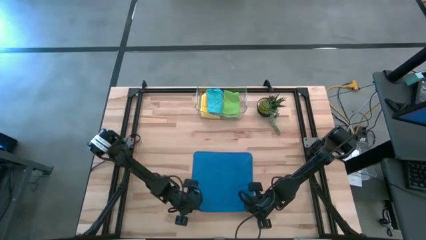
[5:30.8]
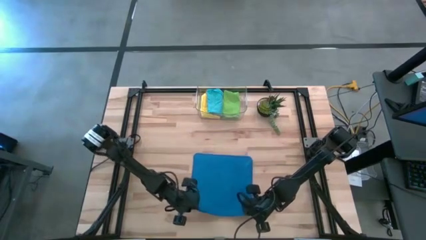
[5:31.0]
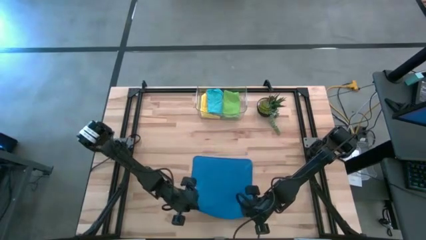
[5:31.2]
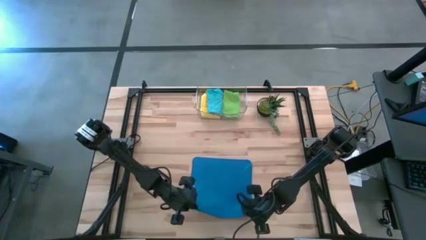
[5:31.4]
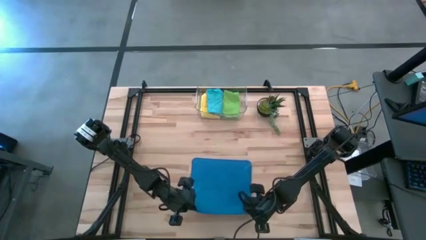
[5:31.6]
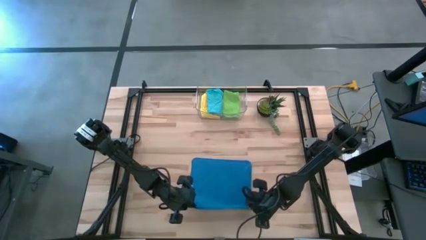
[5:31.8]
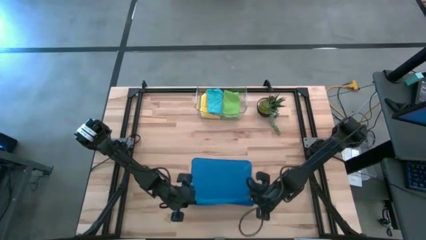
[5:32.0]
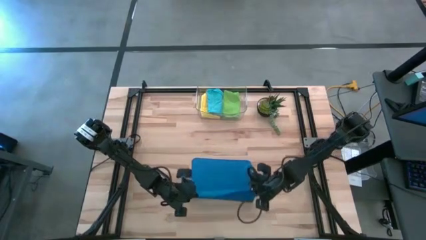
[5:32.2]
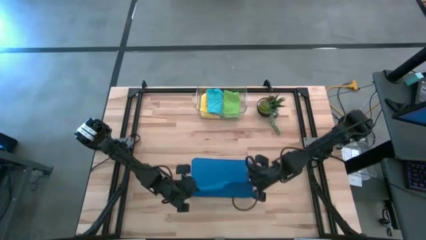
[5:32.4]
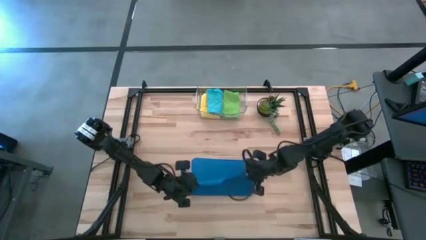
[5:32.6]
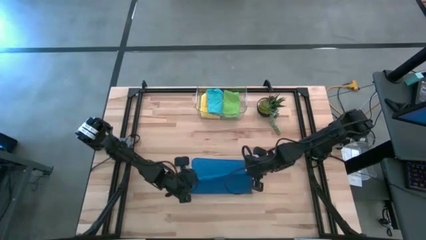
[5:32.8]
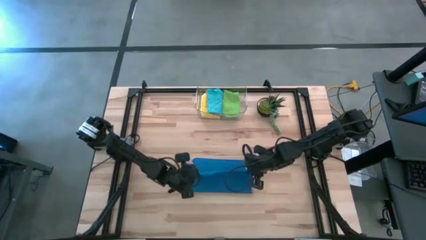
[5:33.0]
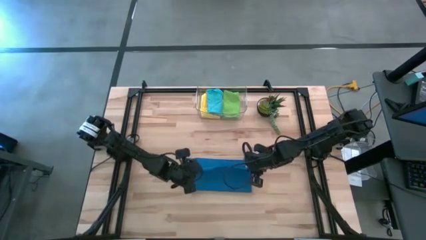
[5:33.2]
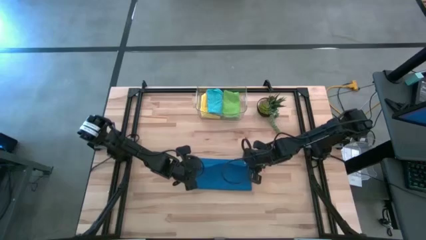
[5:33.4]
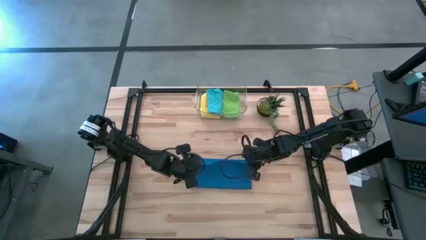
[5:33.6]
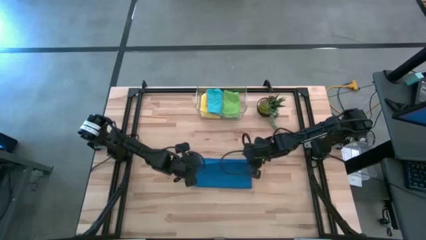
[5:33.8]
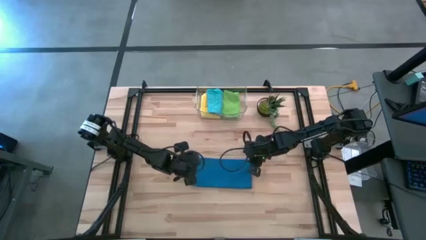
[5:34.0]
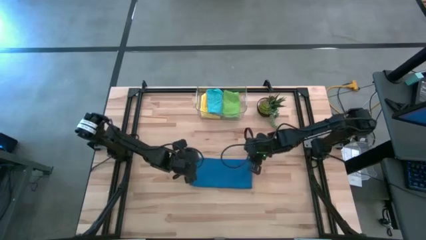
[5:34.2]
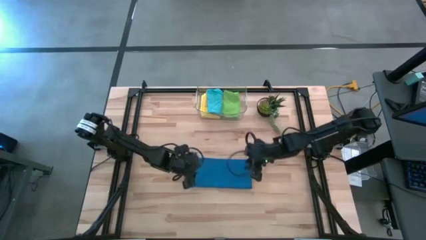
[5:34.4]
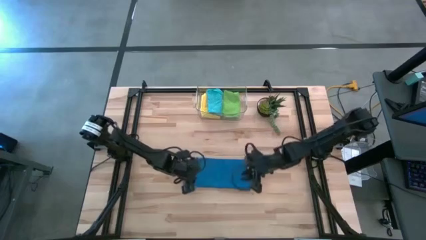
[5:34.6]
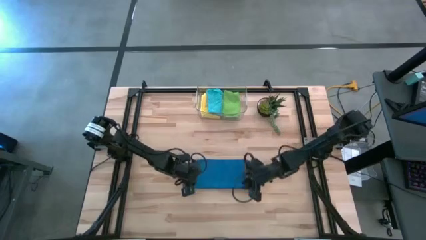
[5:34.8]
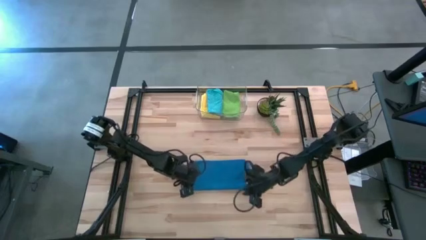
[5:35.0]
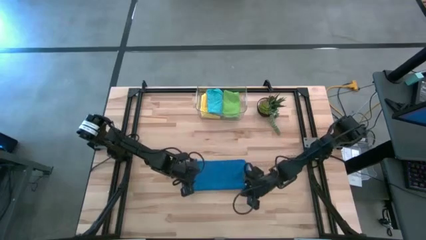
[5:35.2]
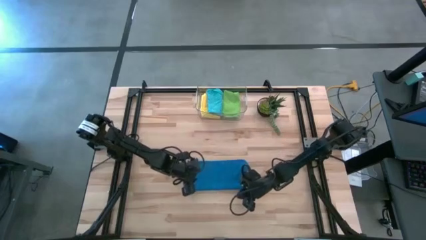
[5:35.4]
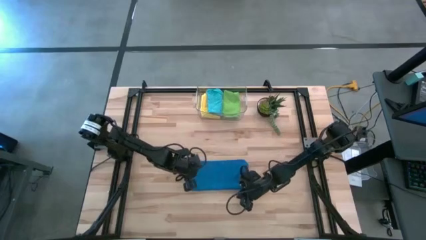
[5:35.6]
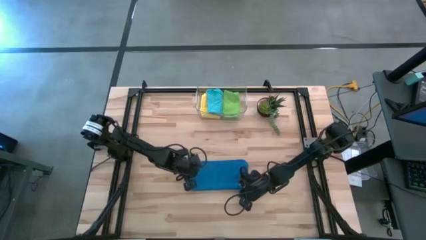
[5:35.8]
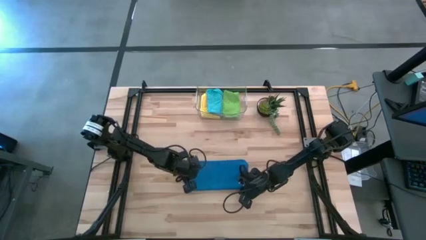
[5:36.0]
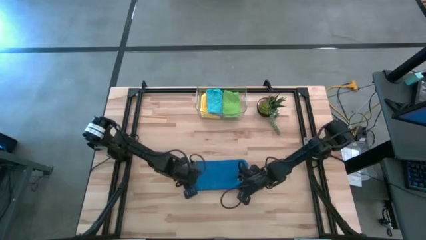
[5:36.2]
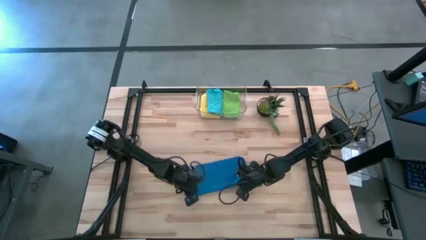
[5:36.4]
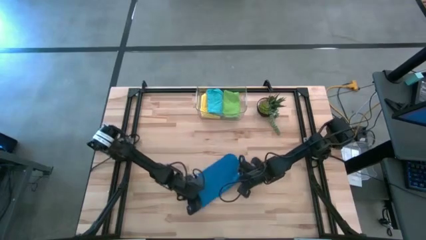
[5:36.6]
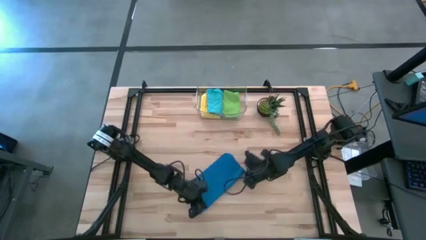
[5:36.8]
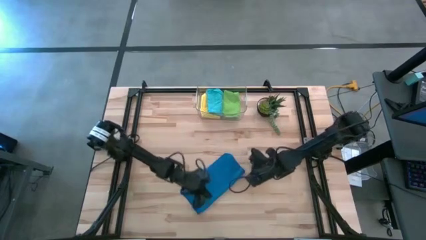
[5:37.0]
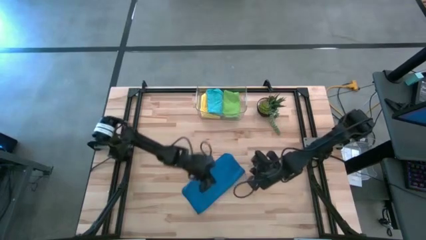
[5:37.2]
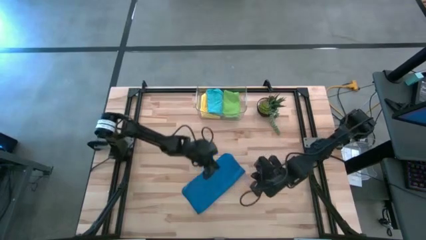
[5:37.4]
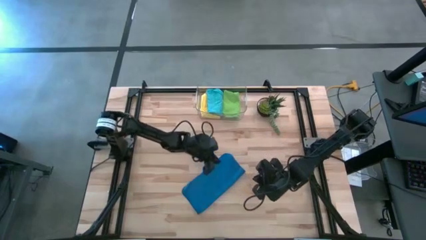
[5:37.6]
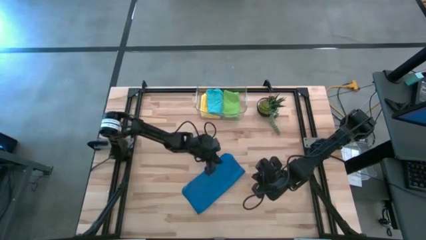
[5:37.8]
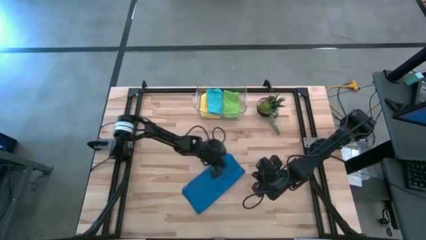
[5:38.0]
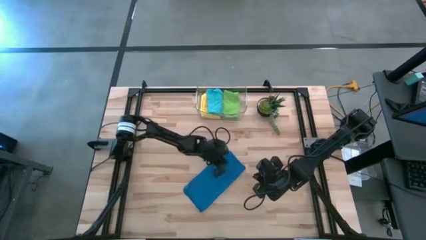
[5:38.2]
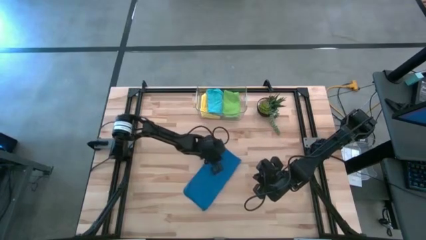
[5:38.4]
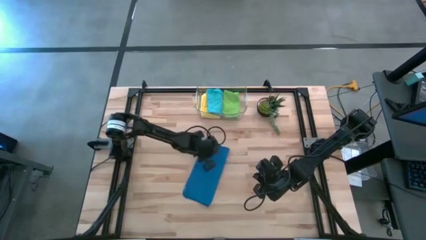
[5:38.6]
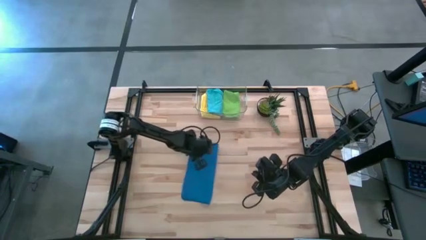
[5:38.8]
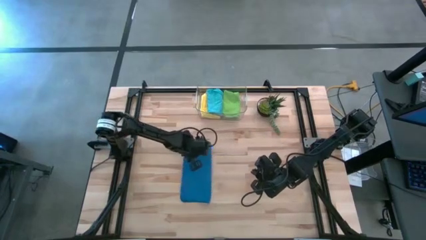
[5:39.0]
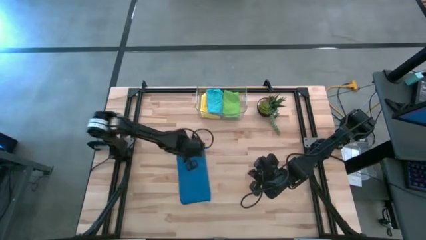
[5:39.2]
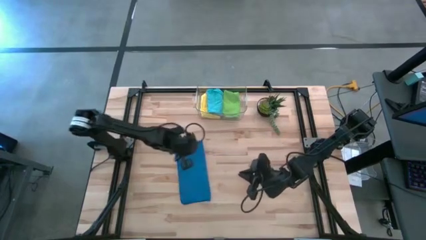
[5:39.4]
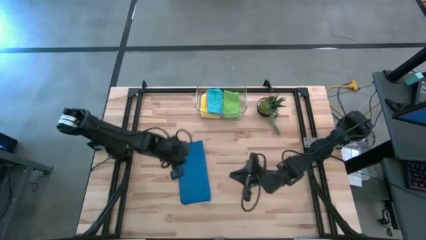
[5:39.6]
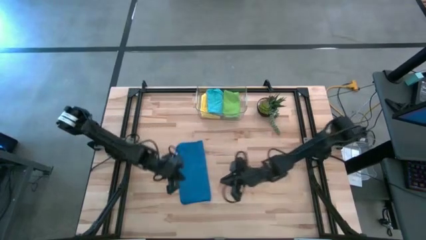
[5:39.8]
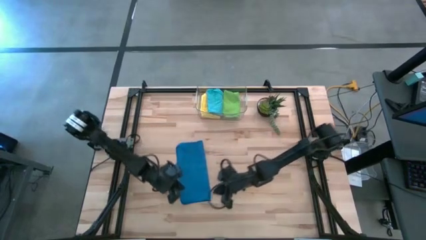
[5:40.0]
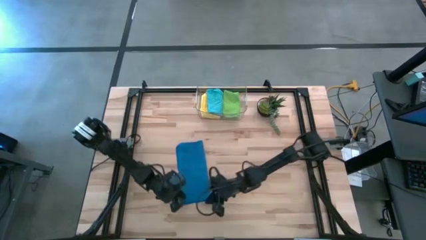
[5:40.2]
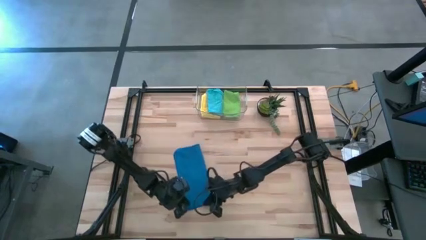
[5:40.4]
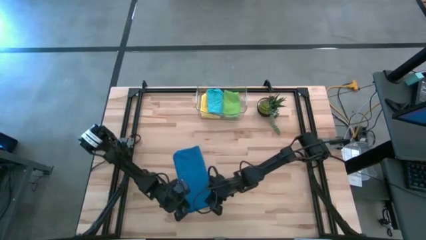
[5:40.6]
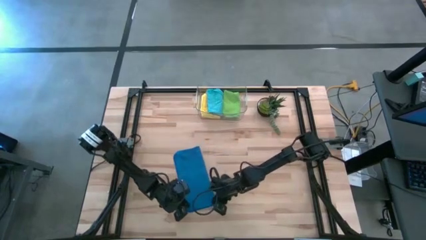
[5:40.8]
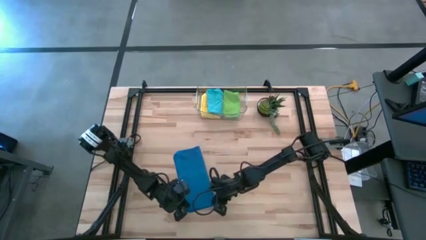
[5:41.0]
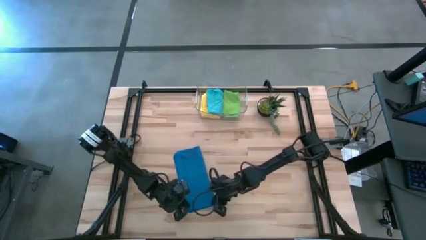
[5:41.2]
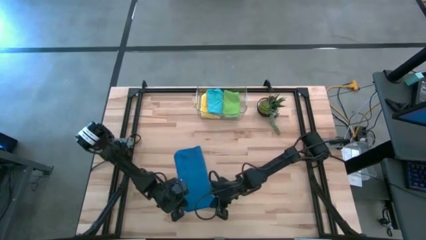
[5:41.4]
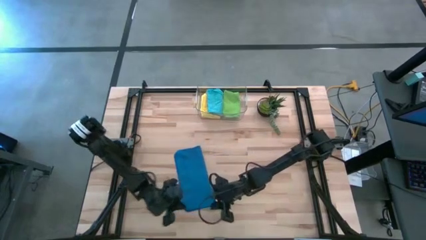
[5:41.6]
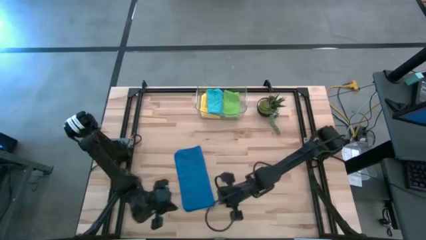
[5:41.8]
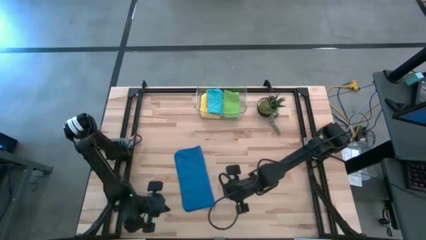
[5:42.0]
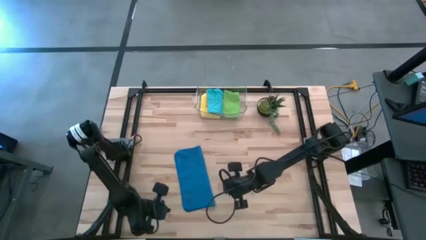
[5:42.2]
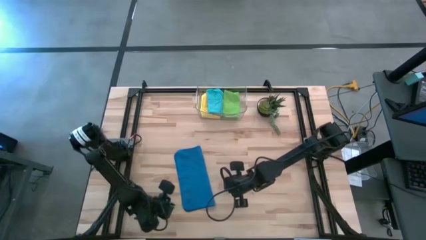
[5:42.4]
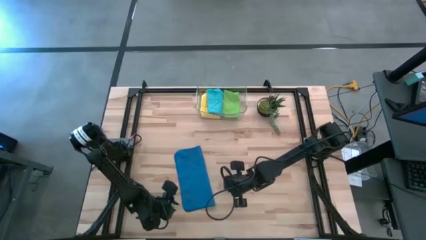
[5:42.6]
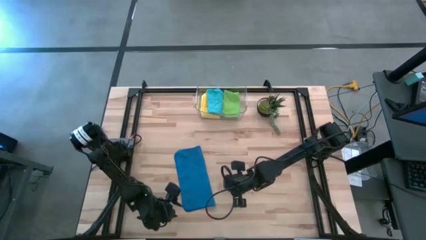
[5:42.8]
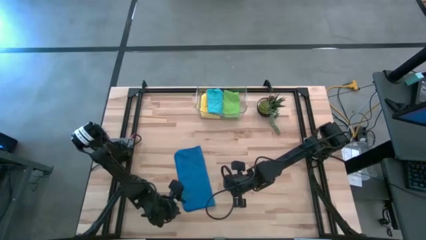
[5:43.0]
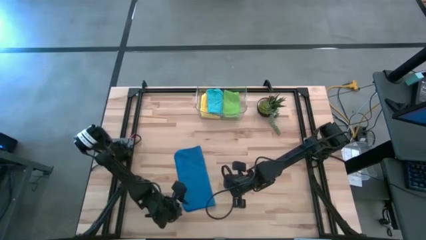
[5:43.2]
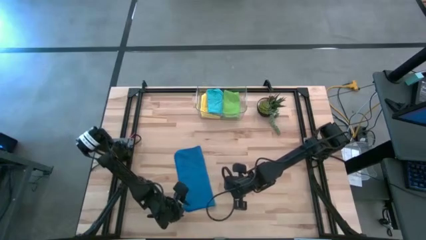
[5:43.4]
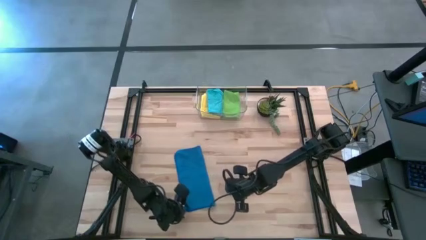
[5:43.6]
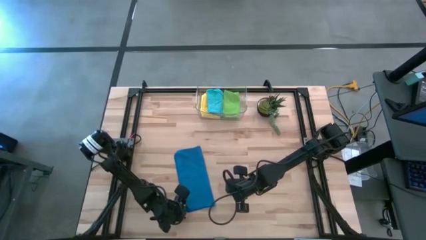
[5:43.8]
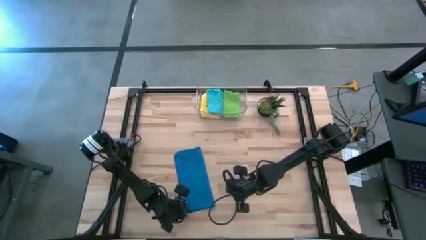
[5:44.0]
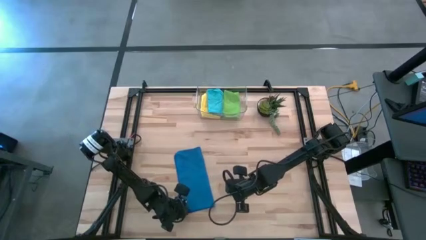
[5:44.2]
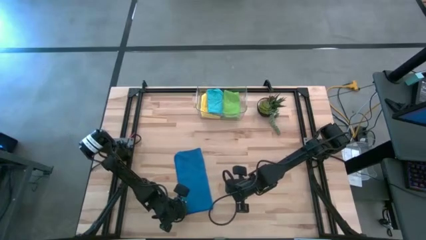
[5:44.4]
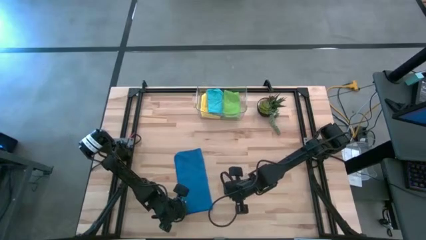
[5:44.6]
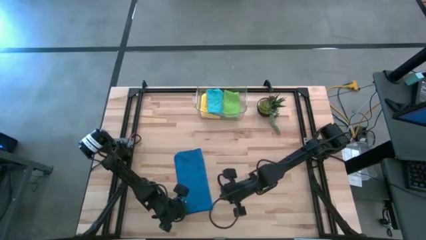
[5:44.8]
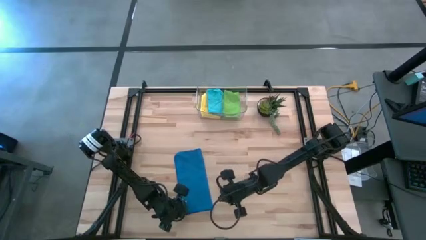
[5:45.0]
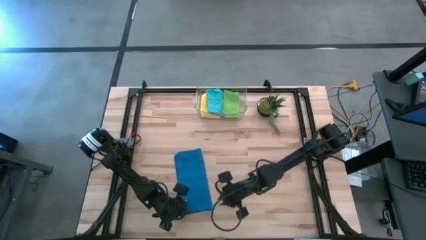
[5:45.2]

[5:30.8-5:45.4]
Task: Fold microfiber towels
Fold the dark blue microfiber towel

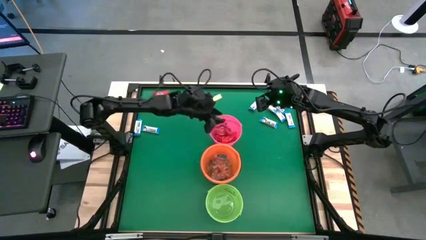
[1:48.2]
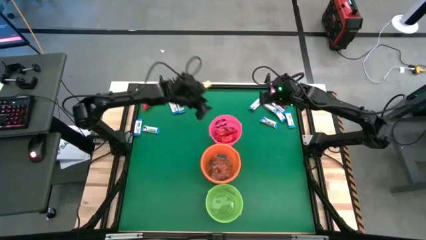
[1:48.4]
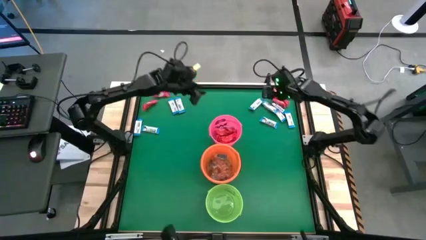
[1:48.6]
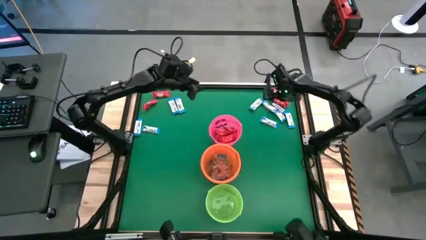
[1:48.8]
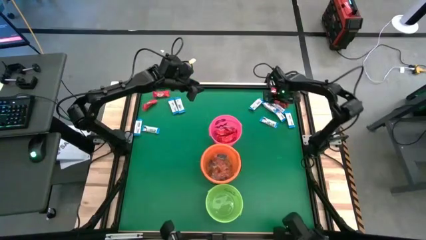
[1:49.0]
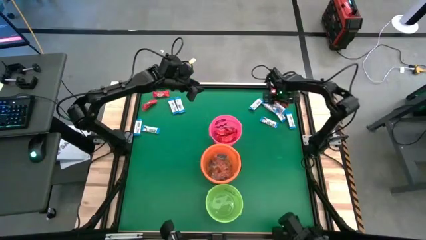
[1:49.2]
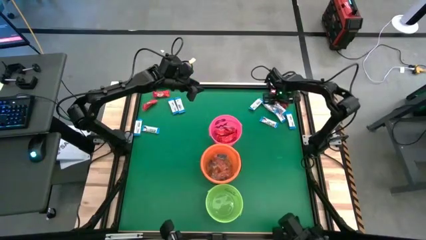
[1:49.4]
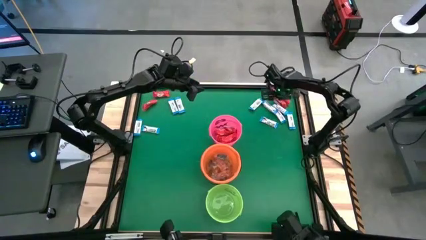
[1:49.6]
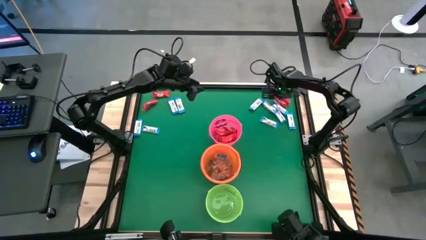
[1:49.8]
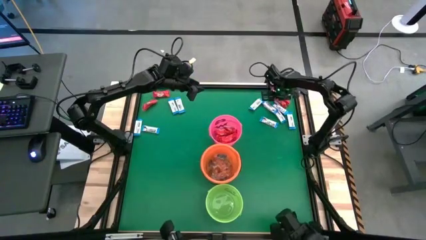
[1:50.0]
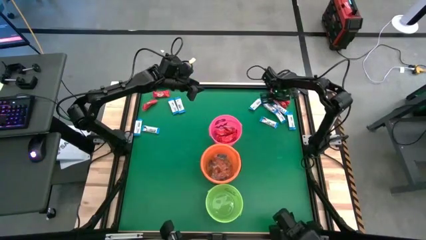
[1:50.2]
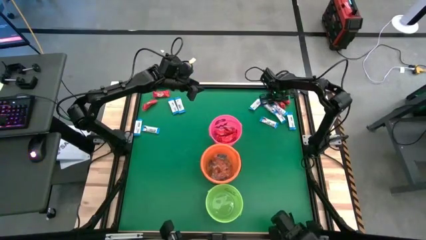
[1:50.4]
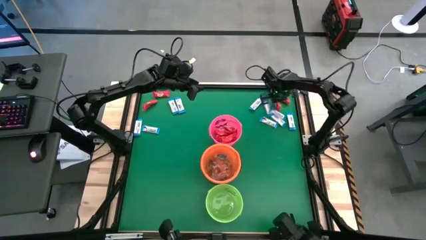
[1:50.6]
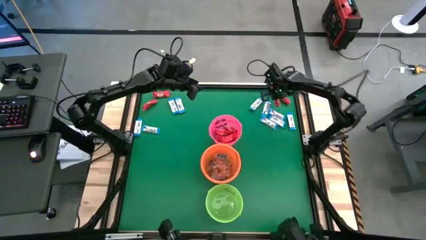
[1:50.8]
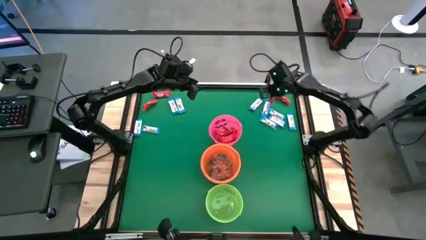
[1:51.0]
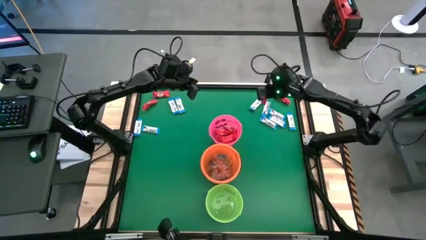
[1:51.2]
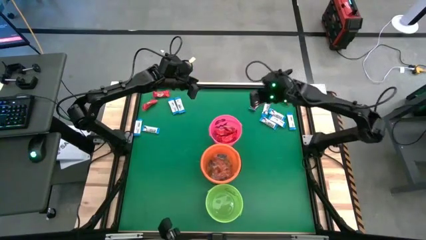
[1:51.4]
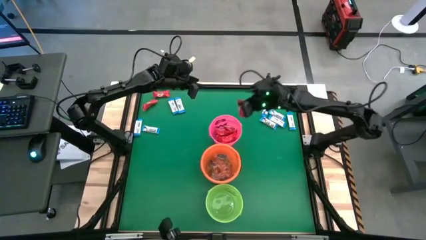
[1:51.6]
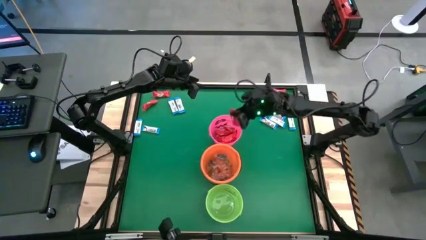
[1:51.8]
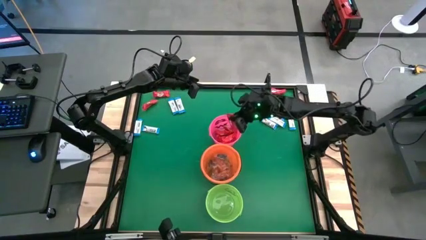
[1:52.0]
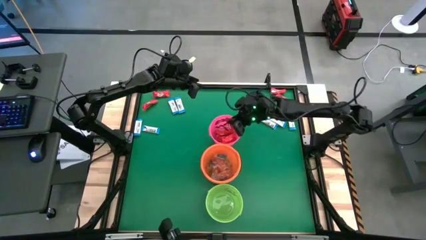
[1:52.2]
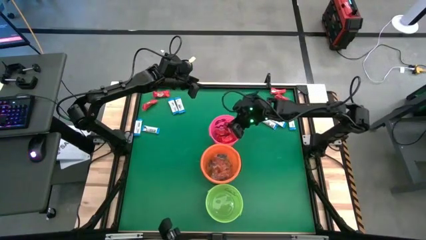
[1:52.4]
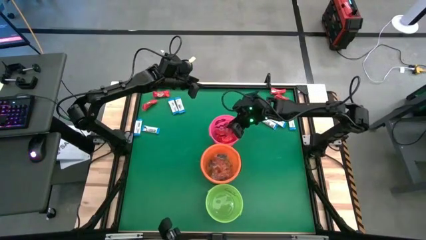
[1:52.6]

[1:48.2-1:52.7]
Task: Sort candy by brand, put in halloween buckets
Put the red chocolate into the pink bucket
